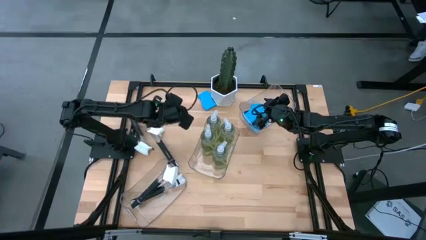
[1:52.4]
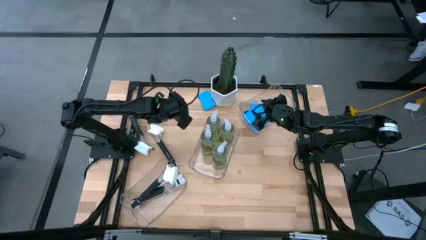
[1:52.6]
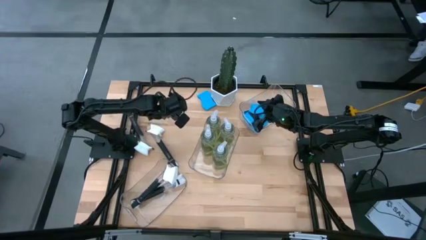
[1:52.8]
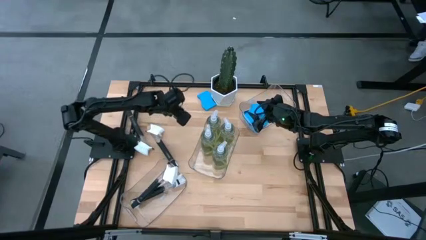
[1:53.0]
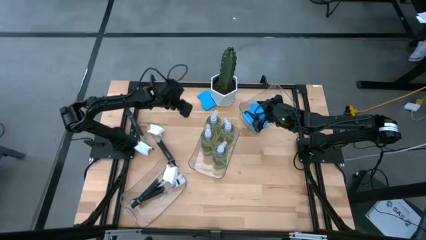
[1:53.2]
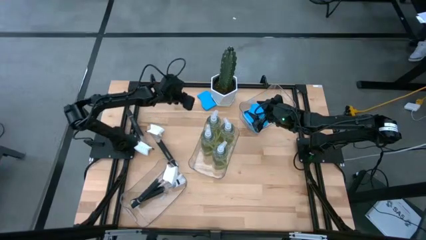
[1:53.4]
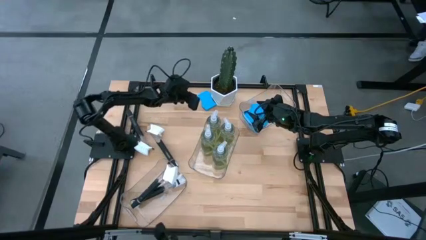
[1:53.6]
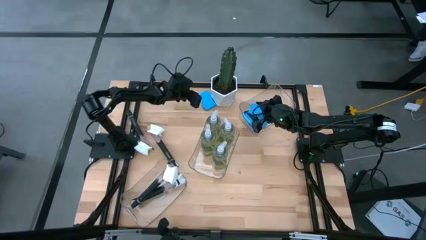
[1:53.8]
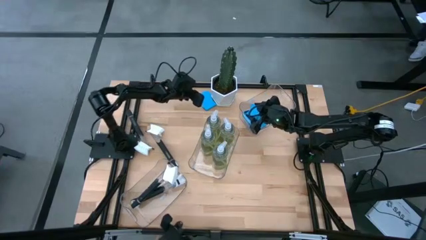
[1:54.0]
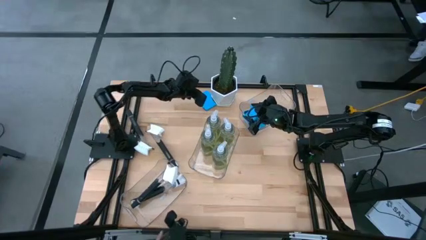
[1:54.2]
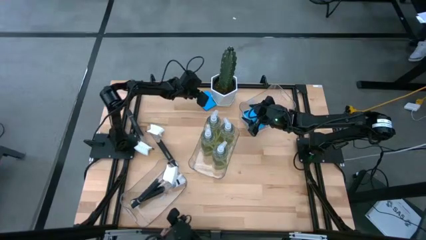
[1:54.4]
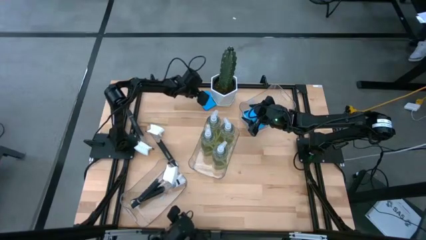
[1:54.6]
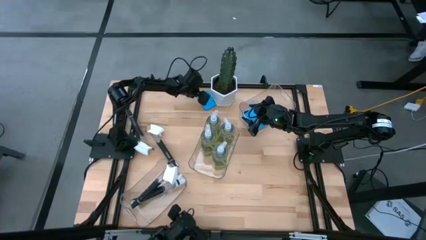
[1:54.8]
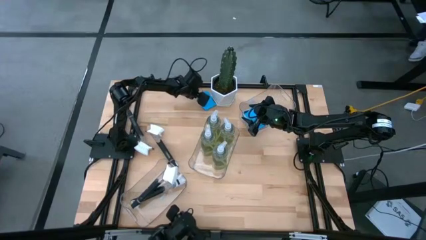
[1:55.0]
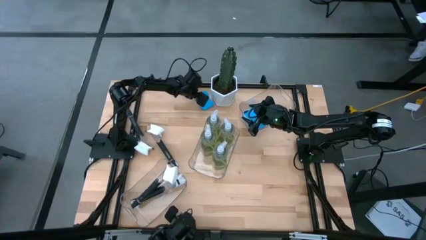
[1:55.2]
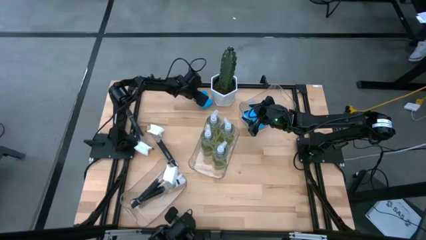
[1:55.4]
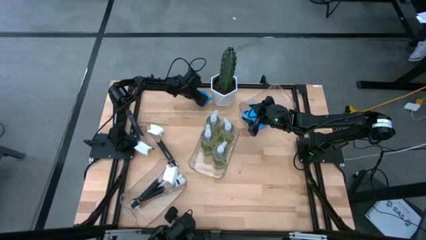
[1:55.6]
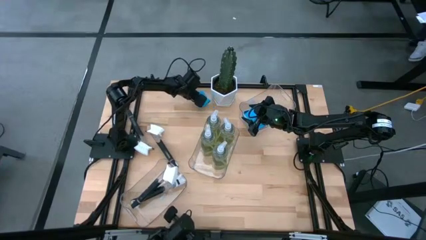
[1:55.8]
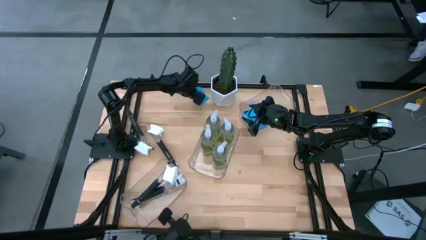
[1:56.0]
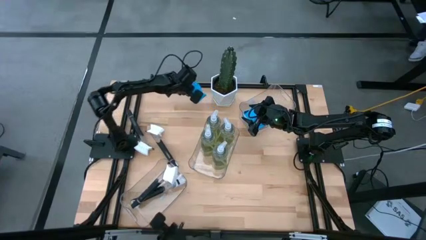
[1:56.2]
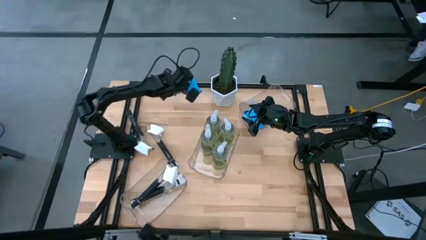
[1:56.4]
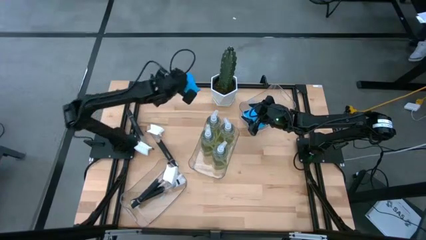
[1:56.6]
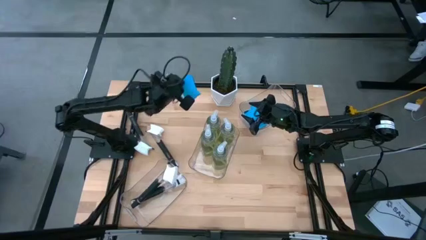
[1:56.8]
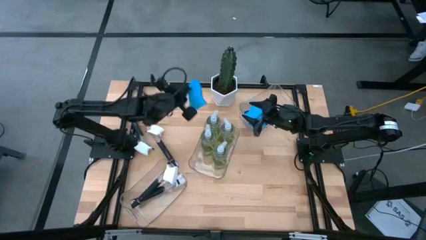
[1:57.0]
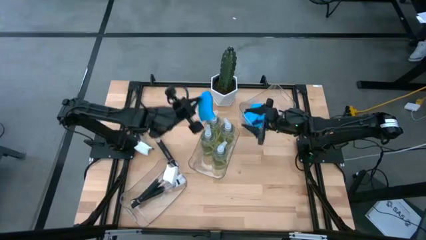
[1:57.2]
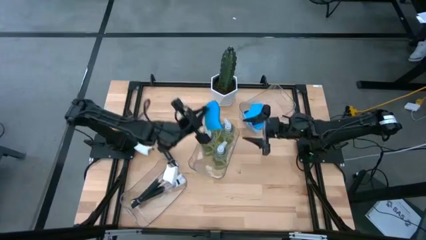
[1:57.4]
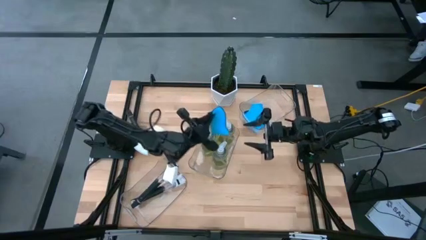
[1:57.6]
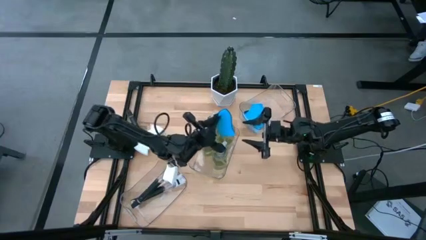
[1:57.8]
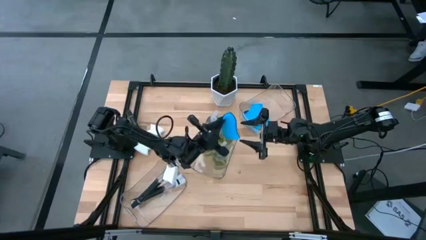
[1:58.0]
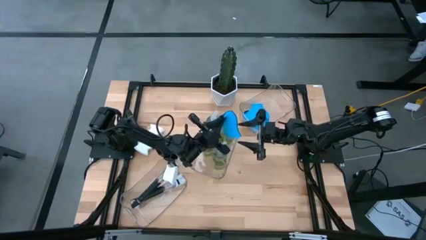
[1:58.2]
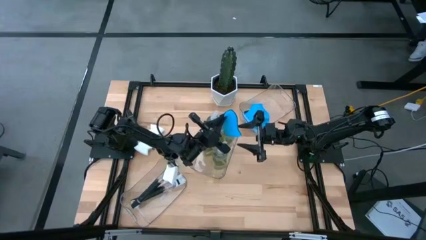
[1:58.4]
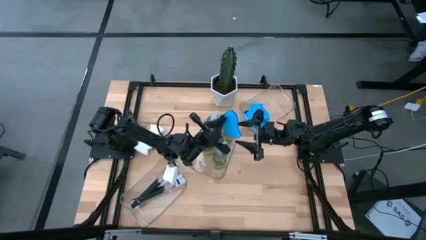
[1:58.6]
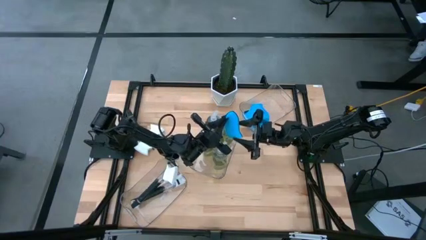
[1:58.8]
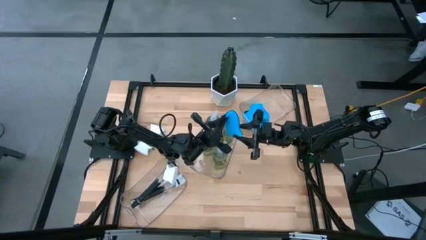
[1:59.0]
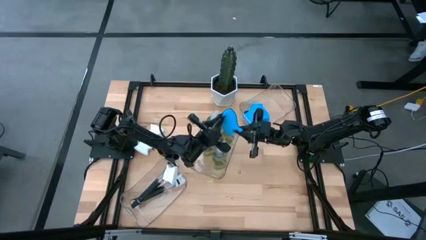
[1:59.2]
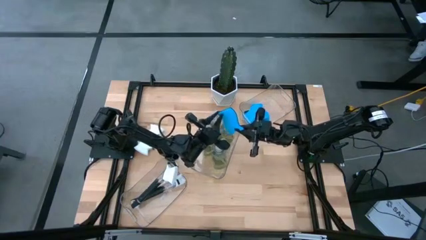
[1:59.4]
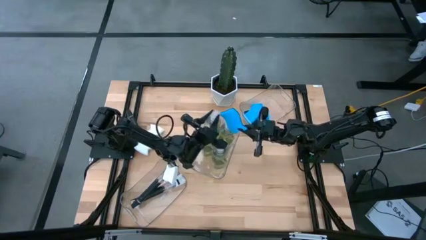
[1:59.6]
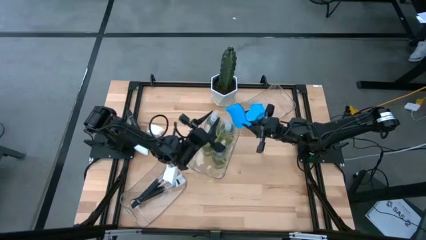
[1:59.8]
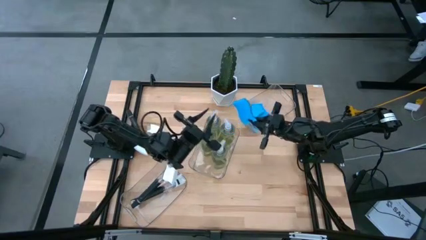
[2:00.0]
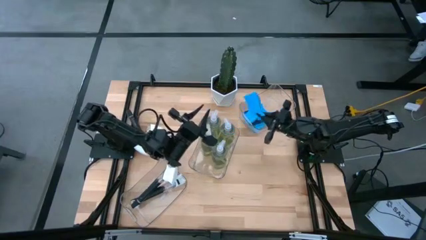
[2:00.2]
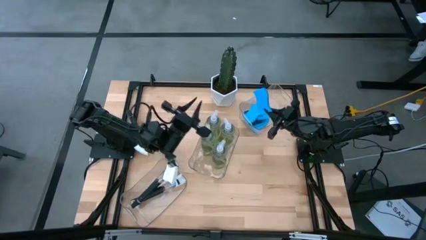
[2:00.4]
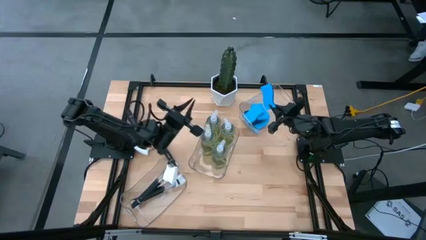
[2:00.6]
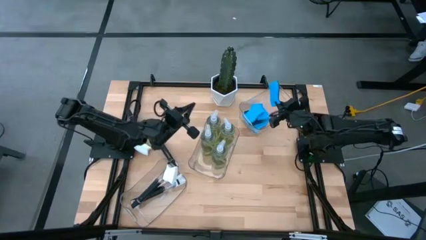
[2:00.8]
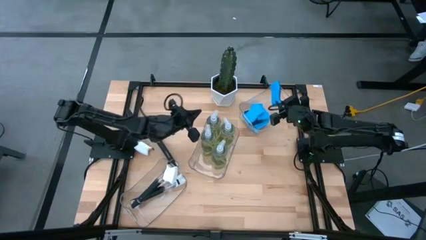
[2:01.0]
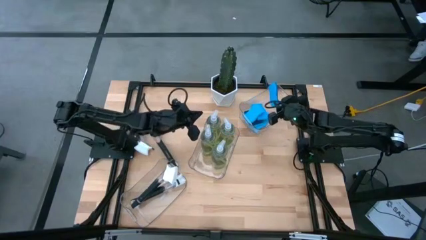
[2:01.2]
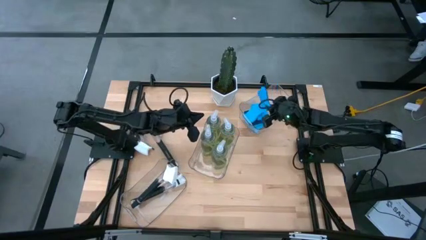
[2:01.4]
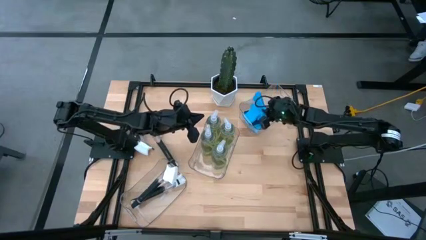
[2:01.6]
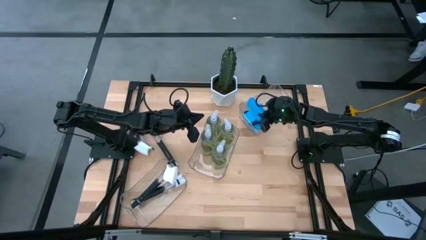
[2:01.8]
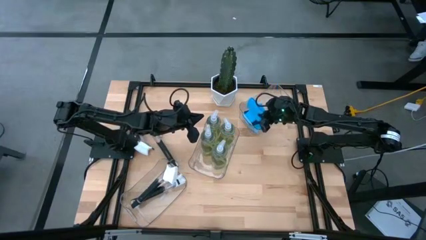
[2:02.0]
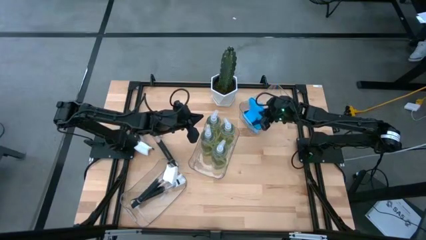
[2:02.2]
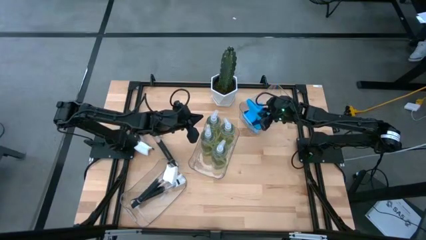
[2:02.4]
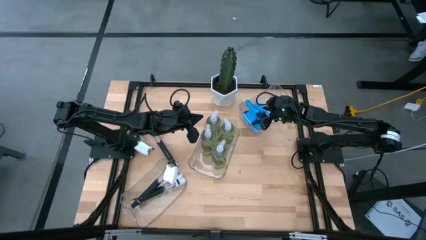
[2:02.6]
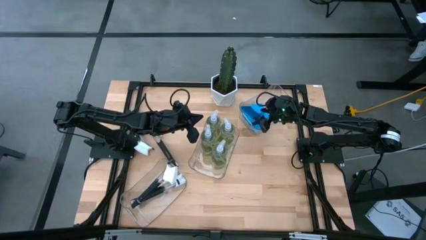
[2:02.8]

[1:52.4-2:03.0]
Task: Pick & Place Kitchen Sink Supplies
Put the blue sponge into the top transparent bin

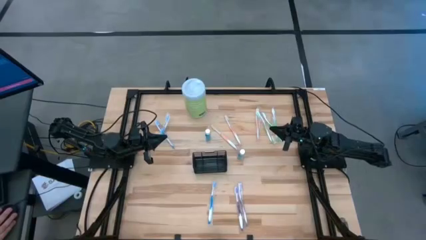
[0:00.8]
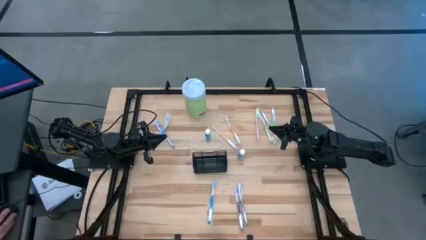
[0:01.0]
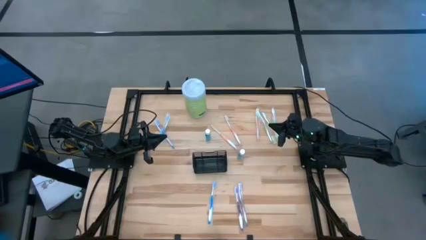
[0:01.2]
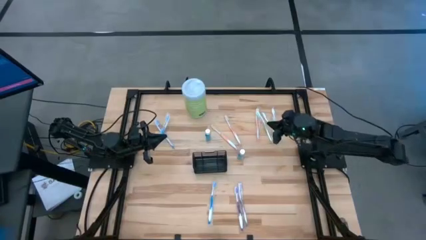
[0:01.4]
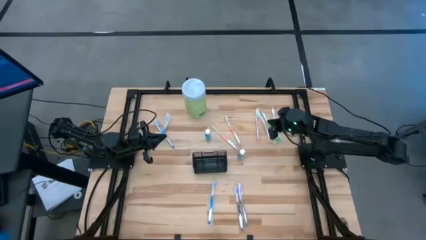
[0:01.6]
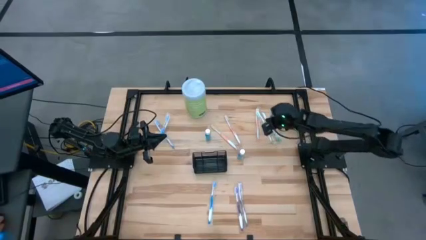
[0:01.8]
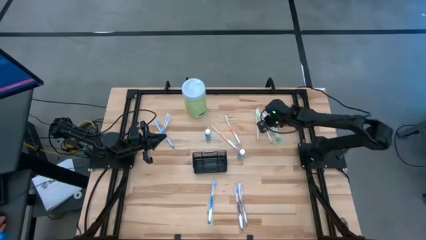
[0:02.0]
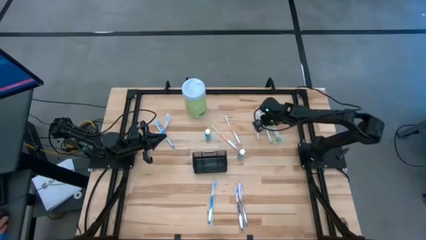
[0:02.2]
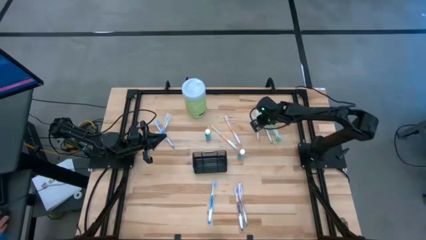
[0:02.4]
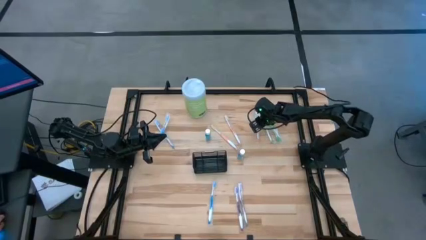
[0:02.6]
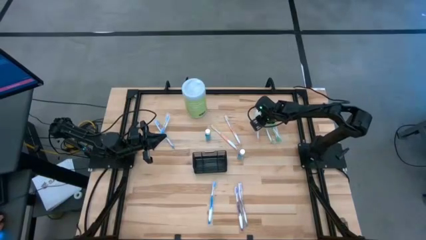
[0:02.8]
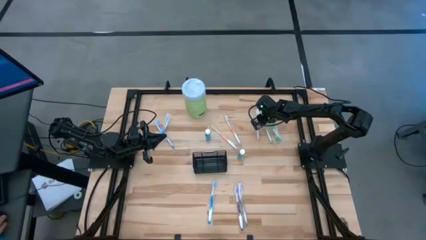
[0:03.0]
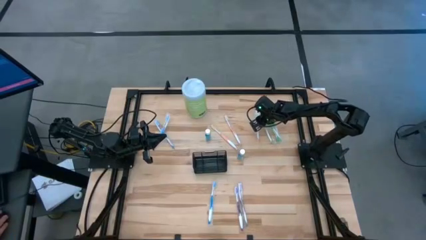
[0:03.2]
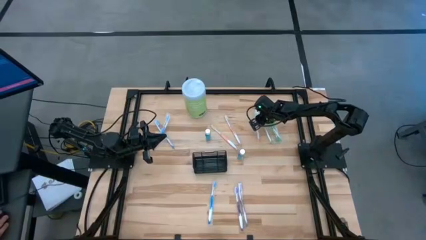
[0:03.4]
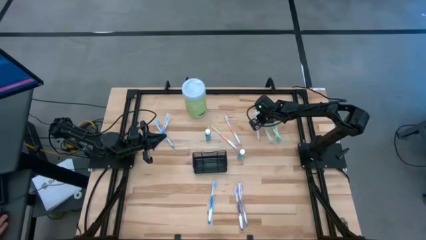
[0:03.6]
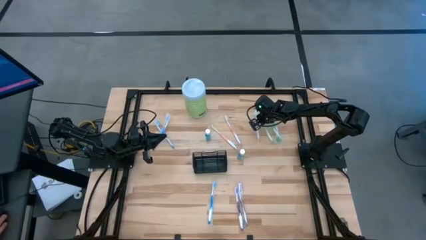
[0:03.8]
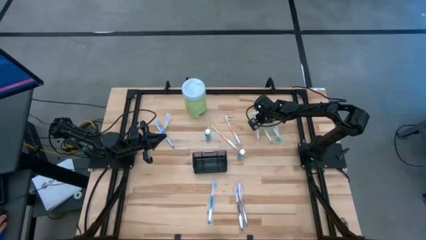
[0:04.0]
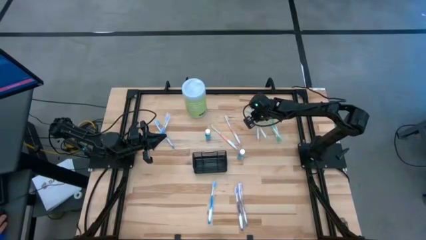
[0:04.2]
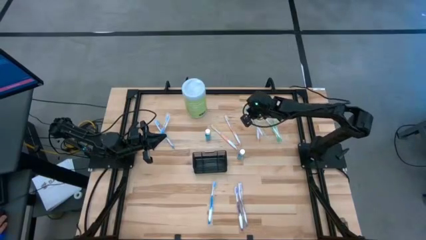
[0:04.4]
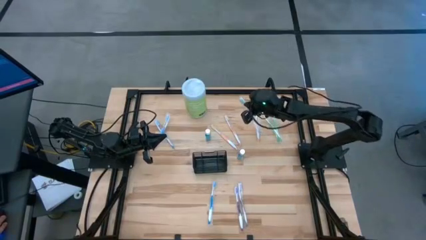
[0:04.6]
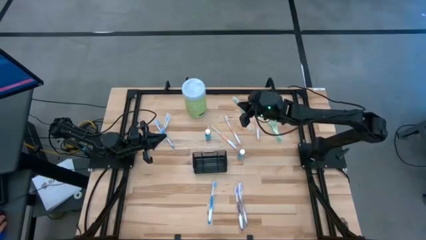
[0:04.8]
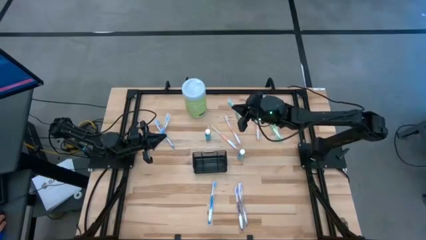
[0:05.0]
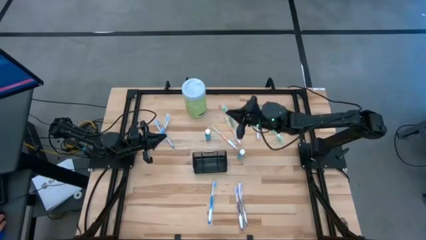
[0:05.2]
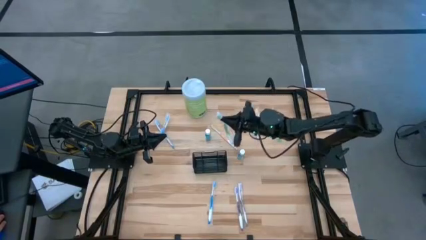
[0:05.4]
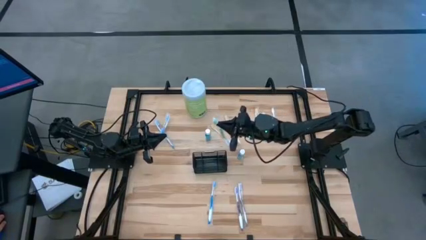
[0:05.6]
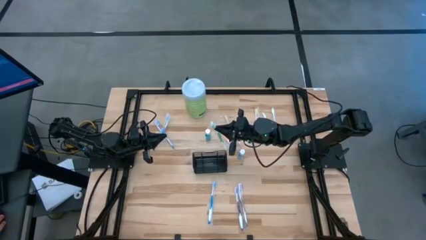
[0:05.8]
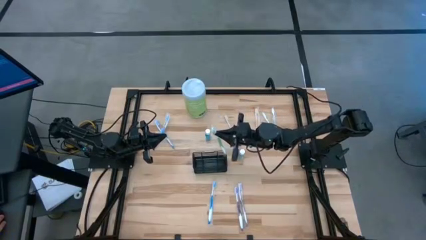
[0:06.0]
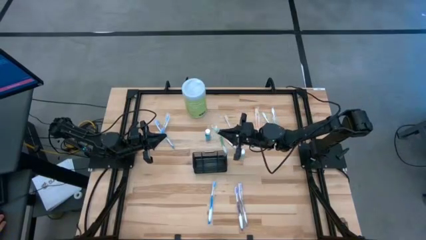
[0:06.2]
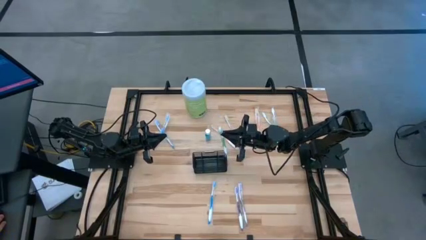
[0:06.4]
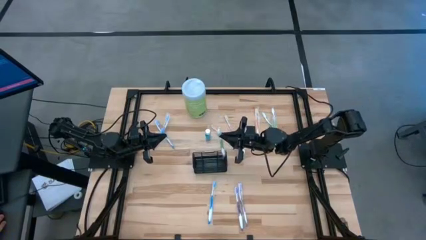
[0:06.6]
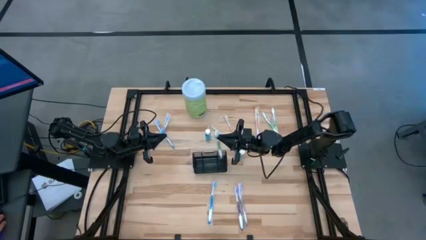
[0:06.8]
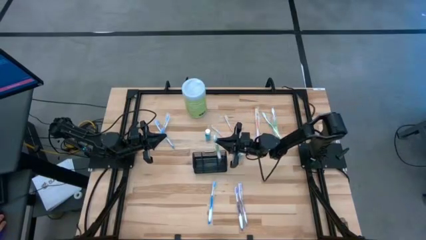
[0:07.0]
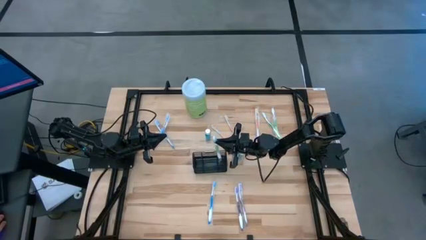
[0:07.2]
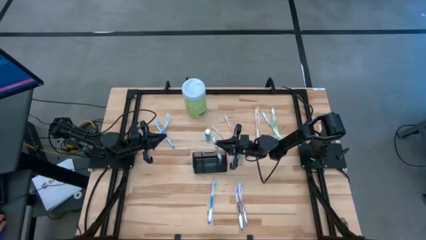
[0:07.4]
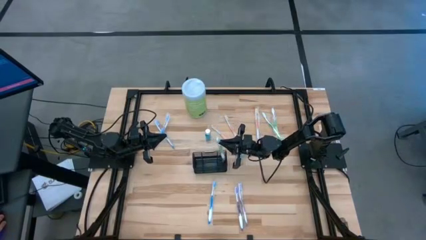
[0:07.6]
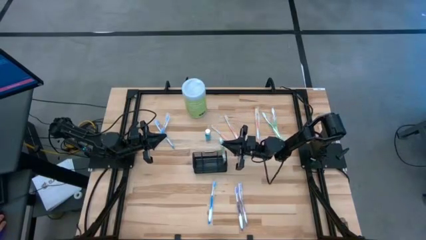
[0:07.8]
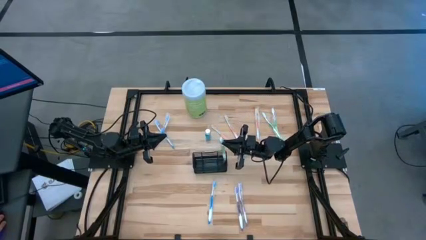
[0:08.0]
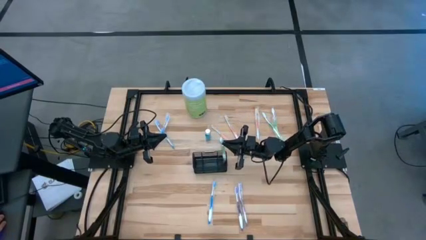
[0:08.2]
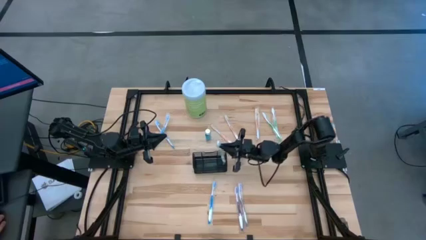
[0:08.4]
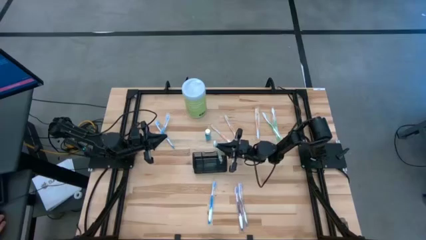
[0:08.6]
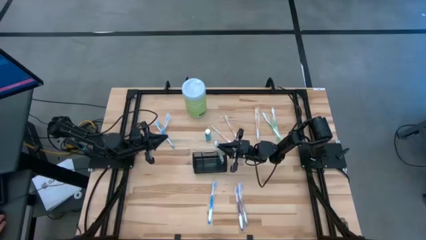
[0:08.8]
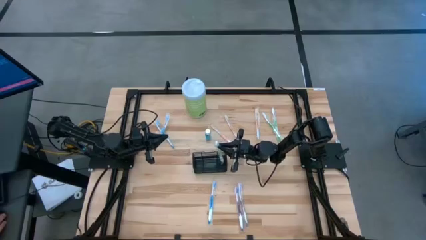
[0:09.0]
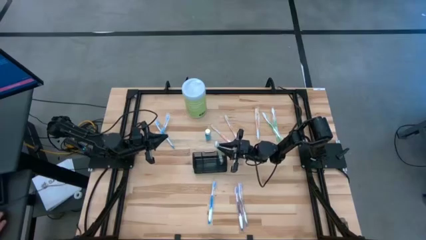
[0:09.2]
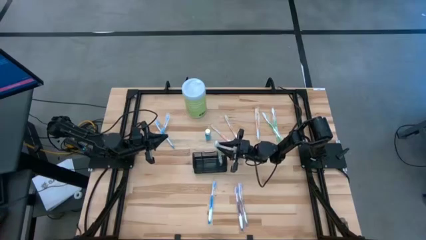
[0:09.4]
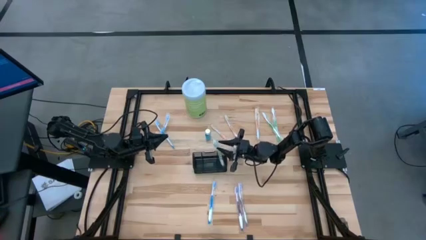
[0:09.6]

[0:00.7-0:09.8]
Task: Pick & Place toothbrushing station
Put the left green toothbrush into the wire organizer
